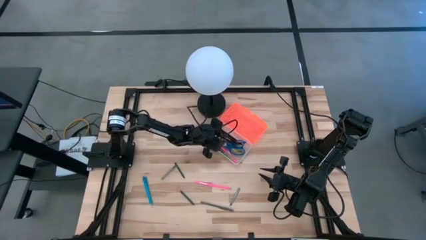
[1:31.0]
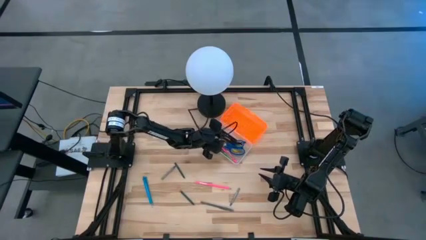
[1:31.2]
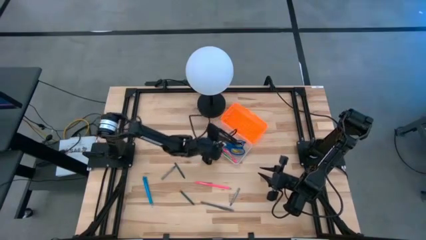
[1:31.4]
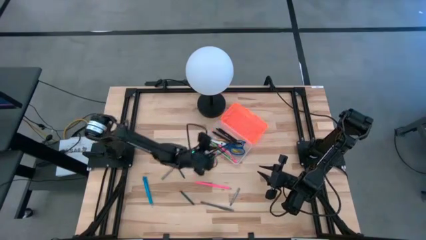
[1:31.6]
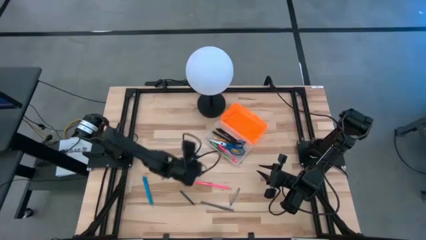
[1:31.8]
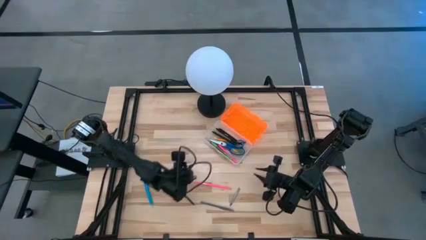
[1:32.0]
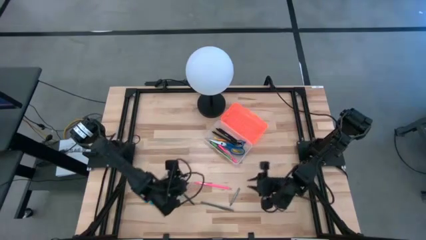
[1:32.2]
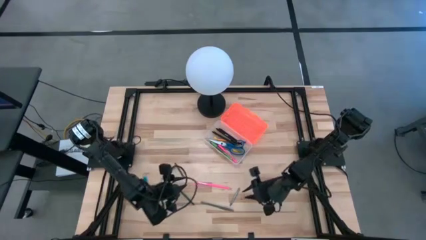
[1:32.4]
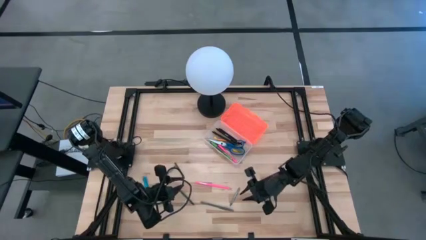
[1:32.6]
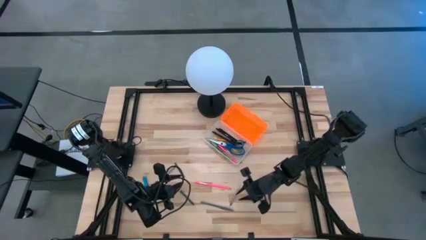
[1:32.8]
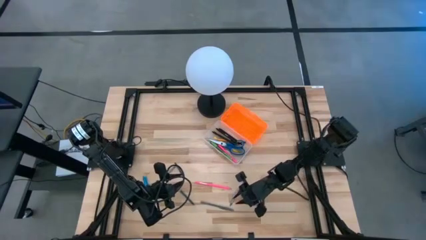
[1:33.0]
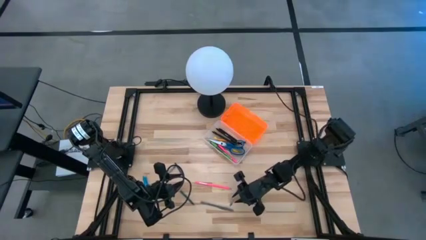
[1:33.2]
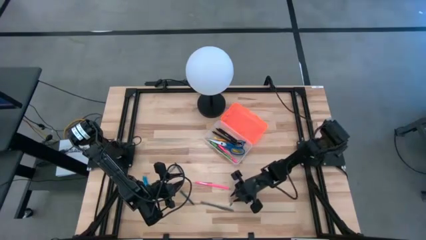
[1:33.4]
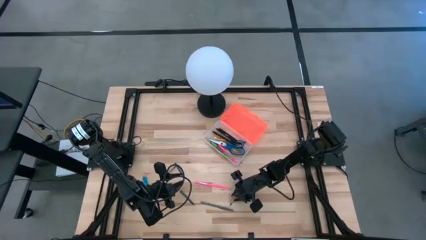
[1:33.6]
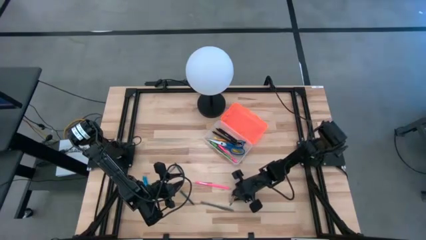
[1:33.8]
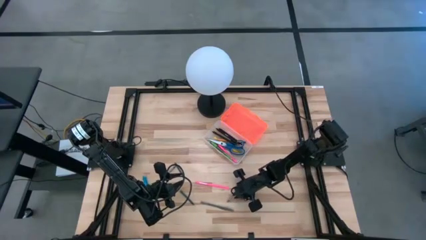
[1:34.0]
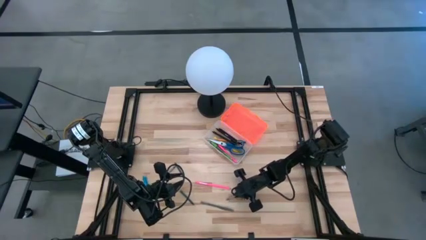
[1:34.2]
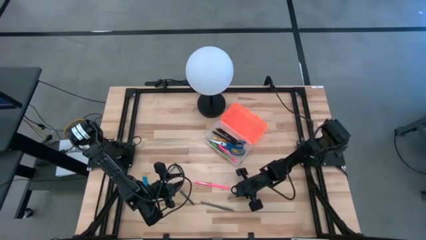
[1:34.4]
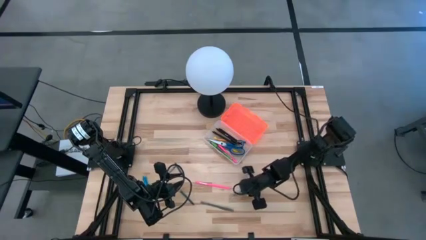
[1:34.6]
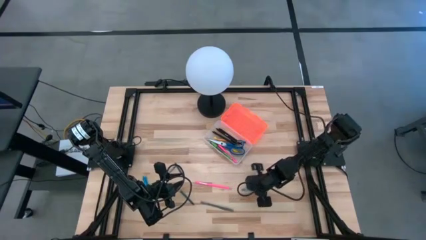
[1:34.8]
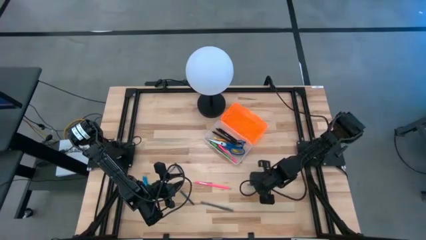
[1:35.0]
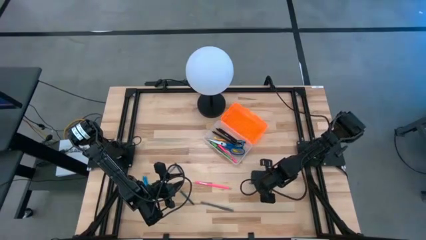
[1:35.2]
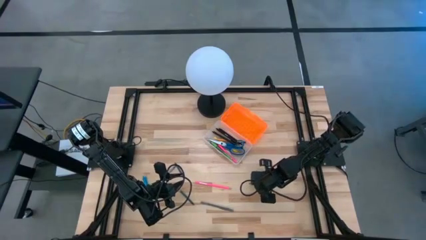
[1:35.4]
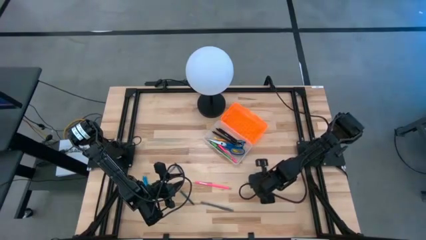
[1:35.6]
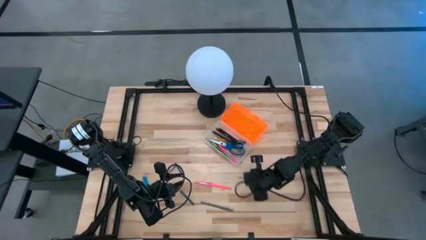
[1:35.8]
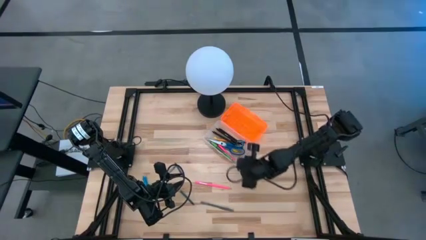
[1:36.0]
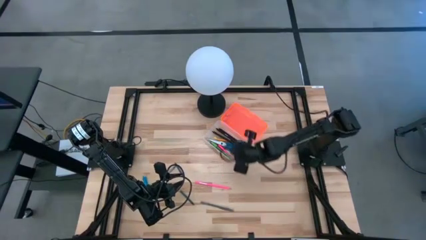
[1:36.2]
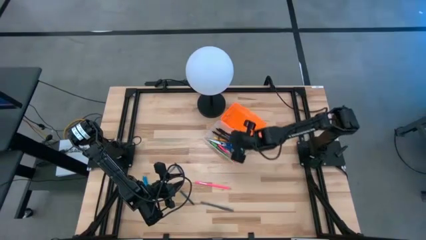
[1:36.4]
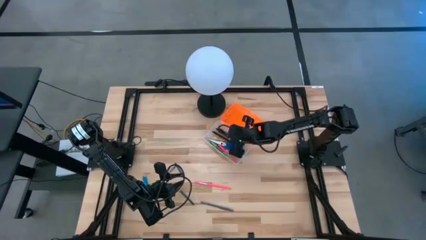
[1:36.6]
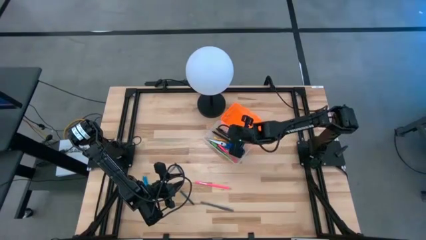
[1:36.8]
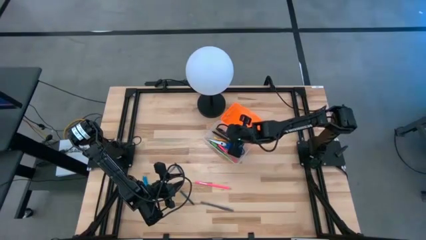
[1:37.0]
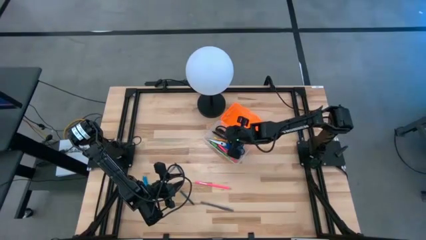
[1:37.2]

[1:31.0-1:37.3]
Task: Pick & place school supplies into a supply box
Put the gray pen into the orange supply box

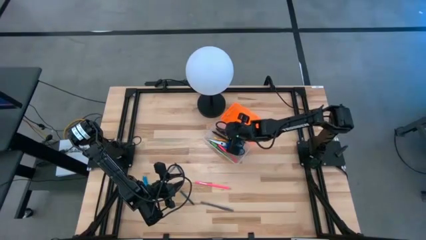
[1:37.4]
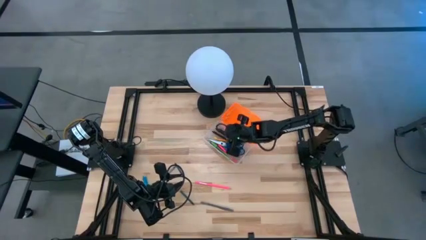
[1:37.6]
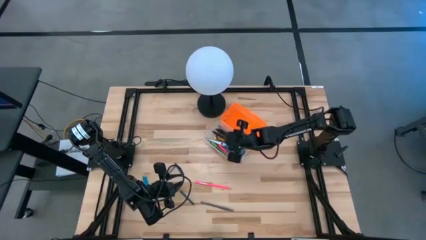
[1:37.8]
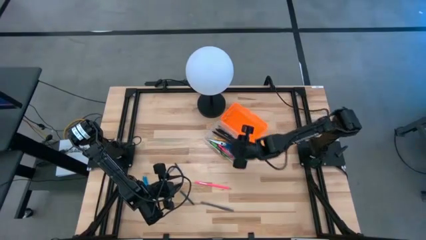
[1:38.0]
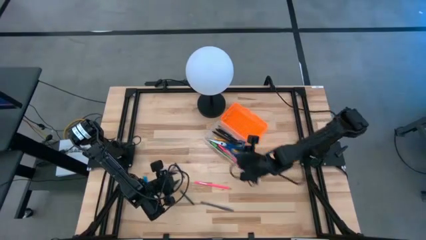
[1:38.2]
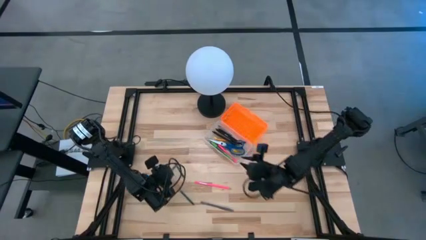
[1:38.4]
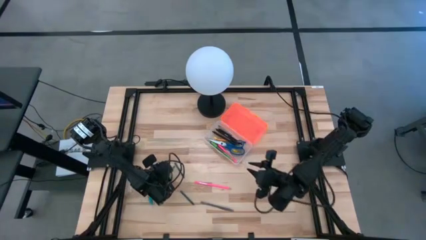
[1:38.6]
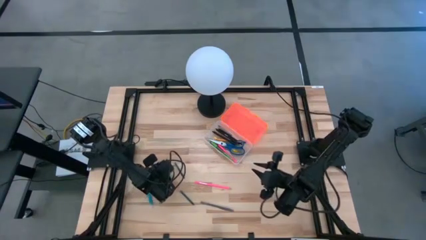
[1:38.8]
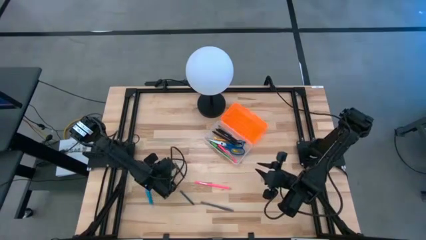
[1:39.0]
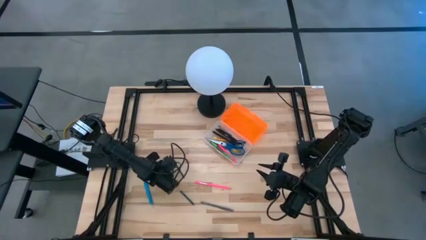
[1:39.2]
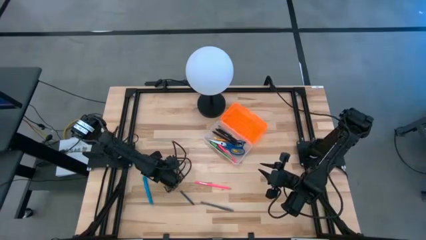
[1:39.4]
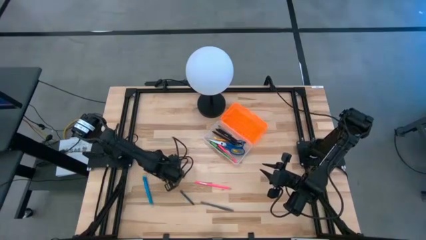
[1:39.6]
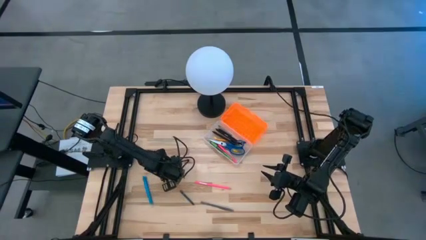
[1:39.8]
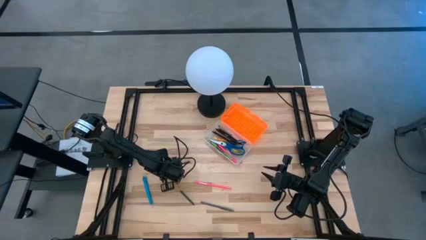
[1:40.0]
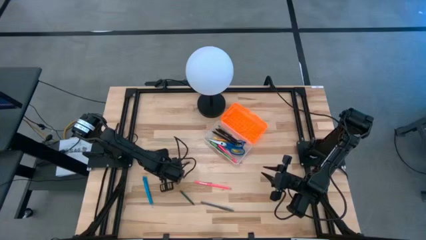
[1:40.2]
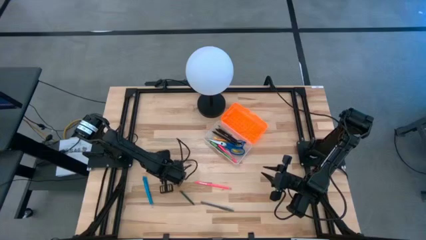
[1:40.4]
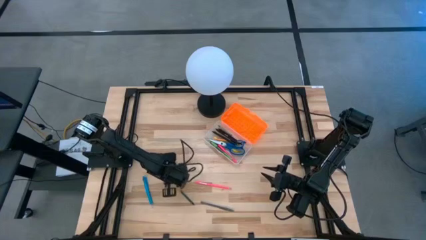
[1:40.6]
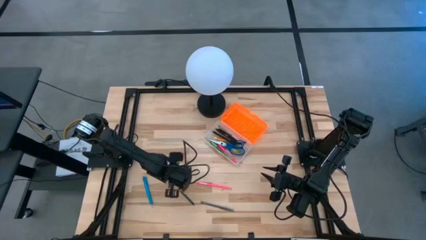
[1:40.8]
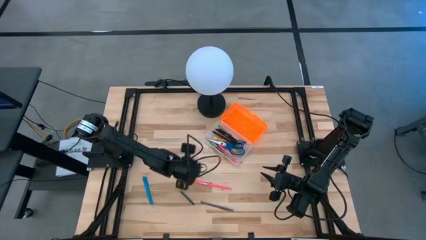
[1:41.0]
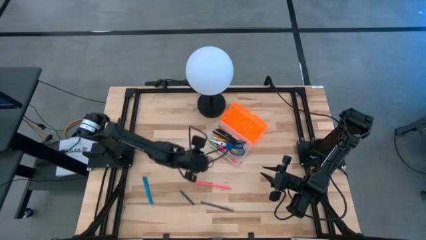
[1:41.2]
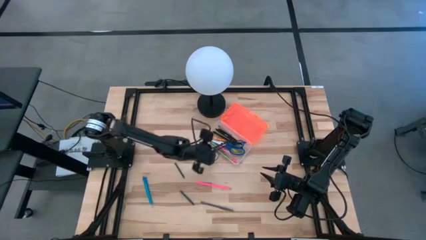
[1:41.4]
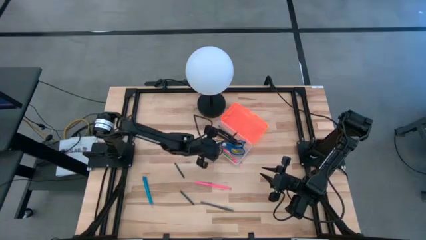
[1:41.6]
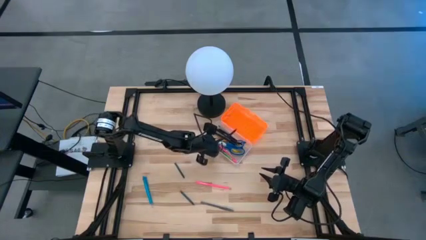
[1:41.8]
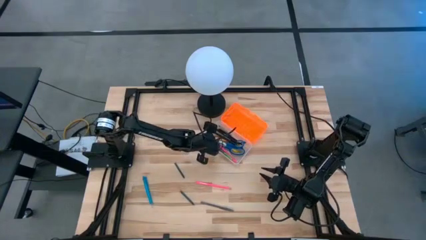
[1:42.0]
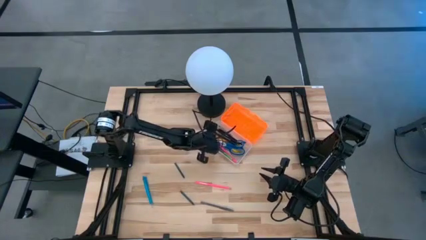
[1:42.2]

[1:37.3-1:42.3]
Put the gray pen into the orange supply box

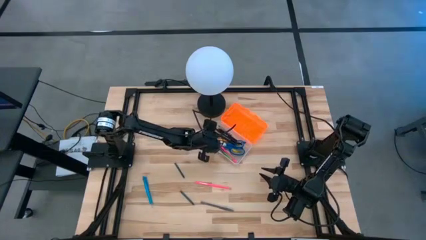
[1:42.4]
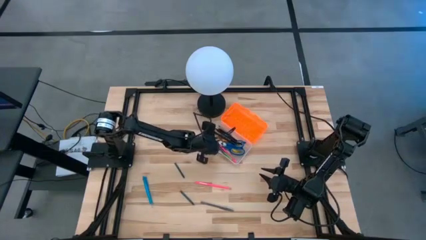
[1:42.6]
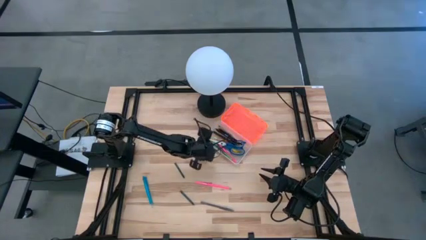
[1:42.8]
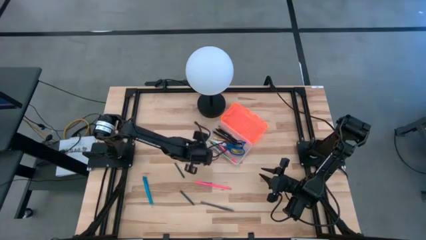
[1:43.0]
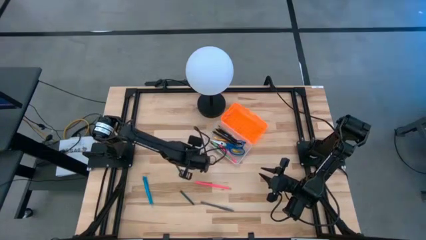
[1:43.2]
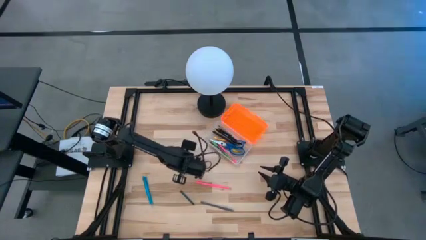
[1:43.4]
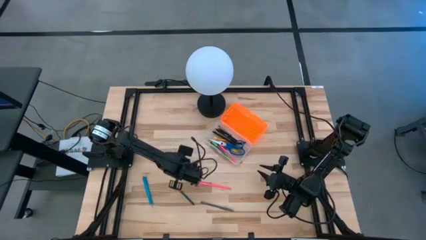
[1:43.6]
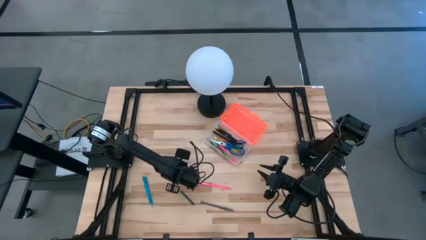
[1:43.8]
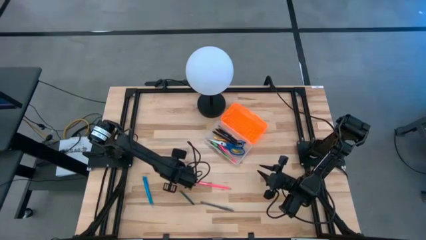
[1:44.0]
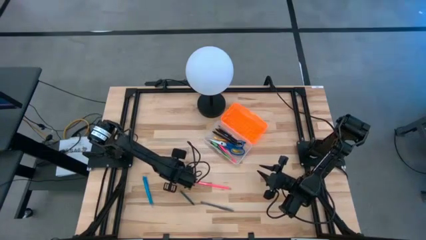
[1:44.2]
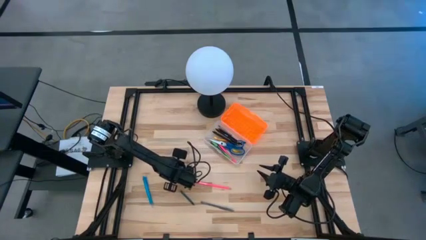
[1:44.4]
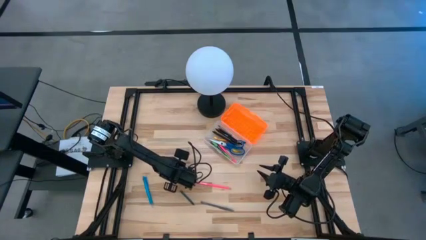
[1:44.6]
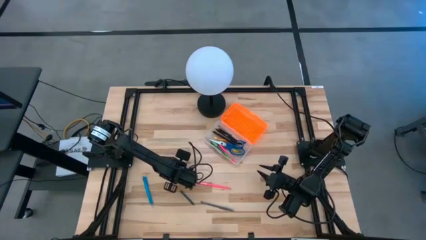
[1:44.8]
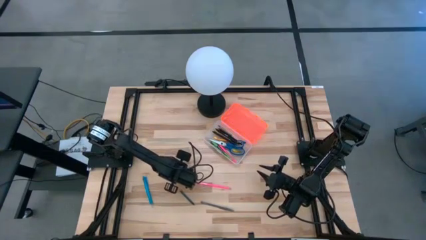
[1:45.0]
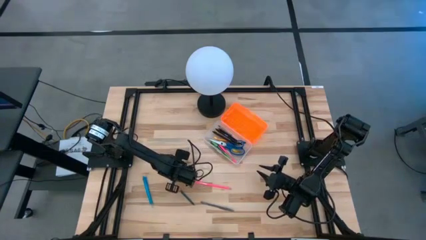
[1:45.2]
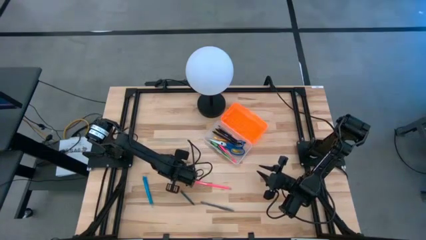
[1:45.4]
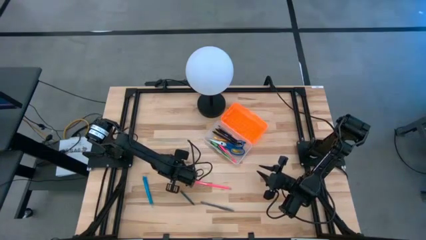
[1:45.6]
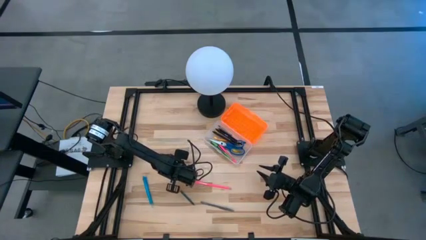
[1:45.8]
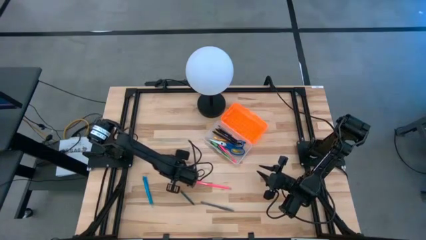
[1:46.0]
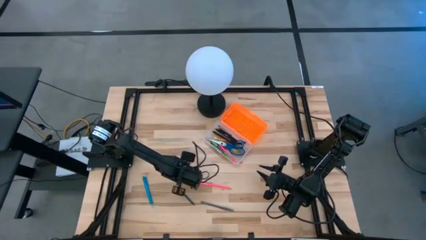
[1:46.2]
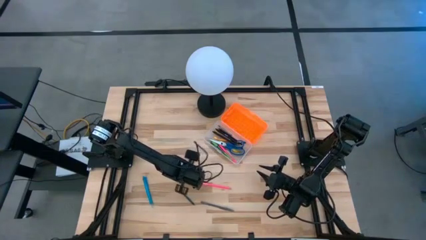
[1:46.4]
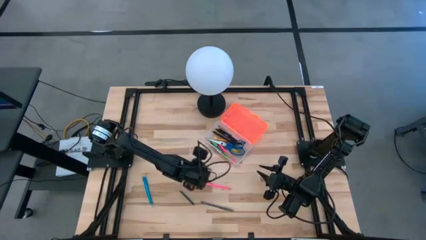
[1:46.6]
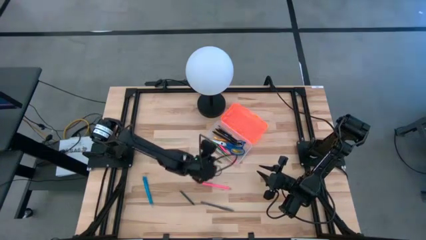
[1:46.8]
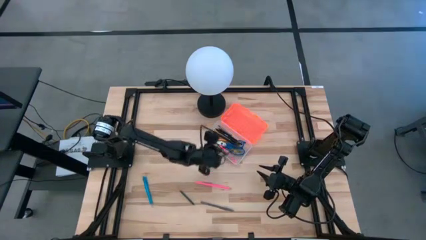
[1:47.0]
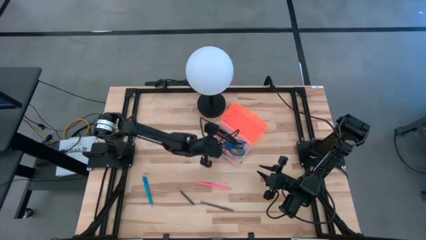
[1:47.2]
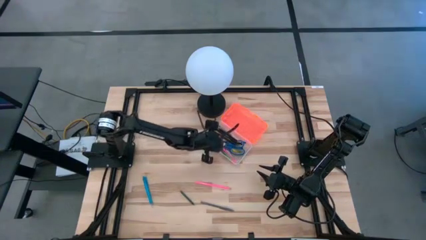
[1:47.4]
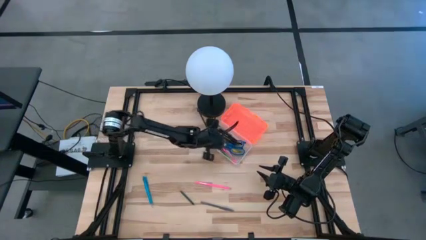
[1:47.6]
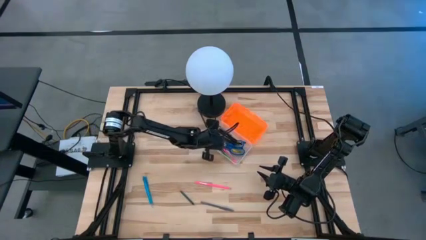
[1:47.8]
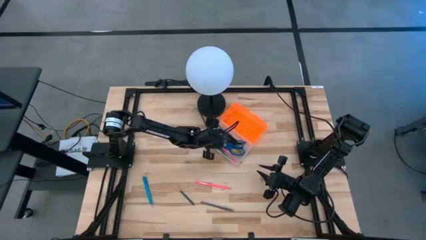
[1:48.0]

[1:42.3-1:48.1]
Put the dark green crayon into the orange supply box
